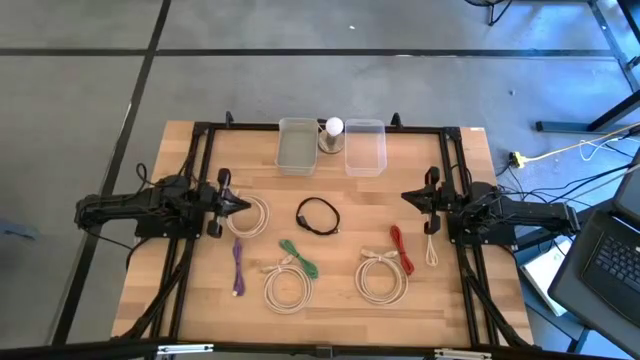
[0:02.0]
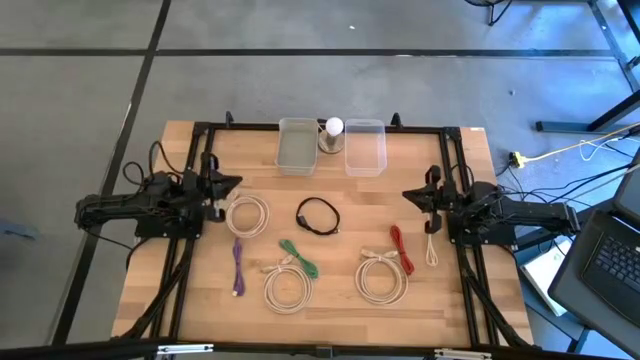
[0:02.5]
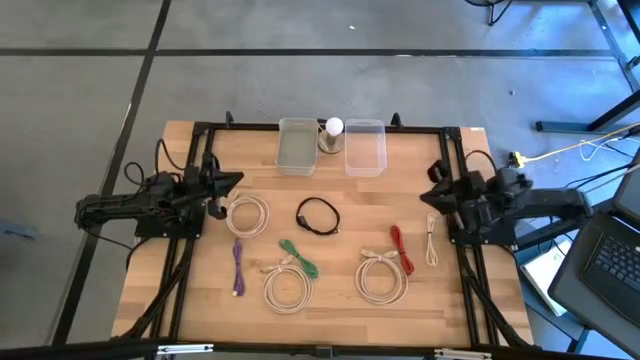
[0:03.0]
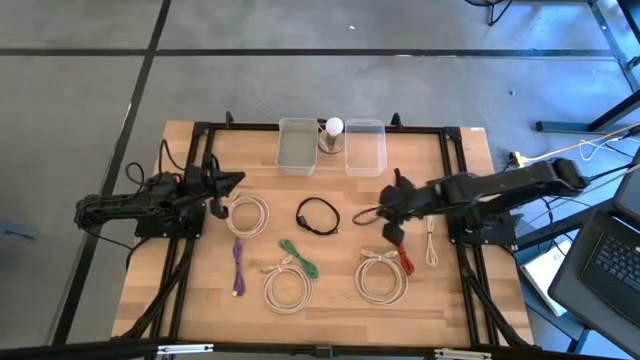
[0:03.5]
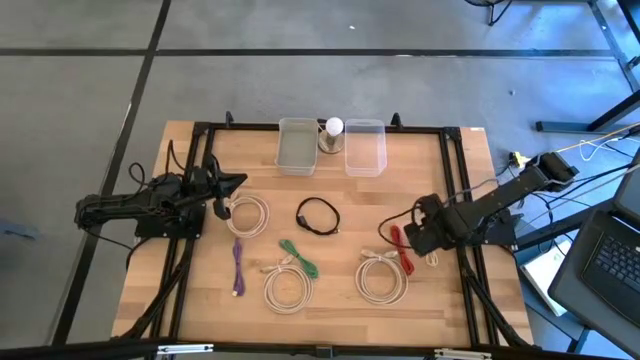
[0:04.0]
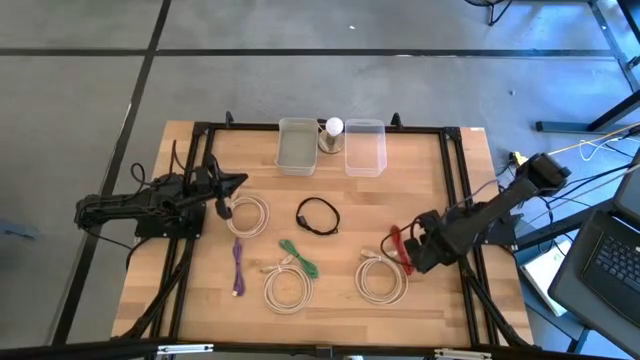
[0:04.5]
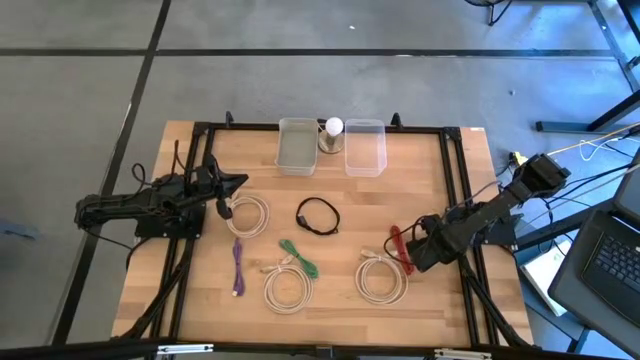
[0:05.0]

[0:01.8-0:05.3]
Put the light brown charger cable into the transparent bin

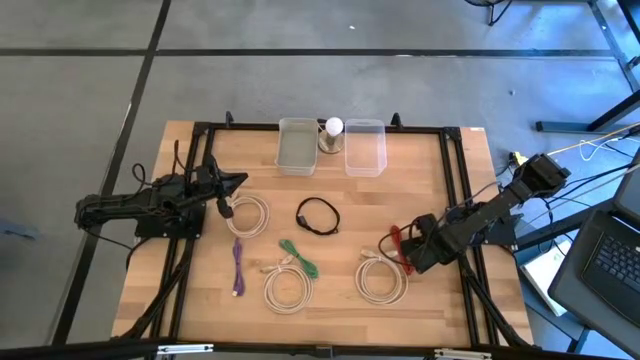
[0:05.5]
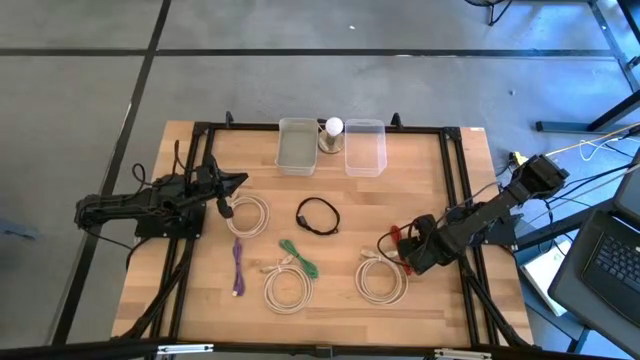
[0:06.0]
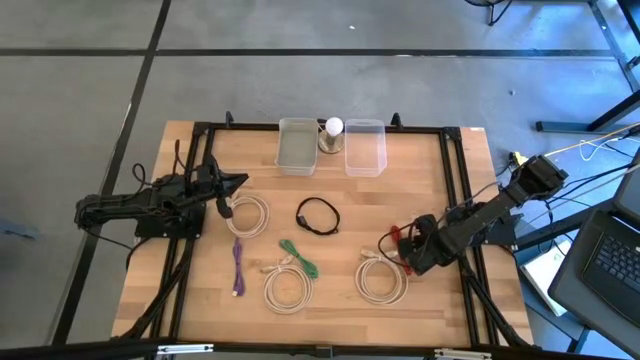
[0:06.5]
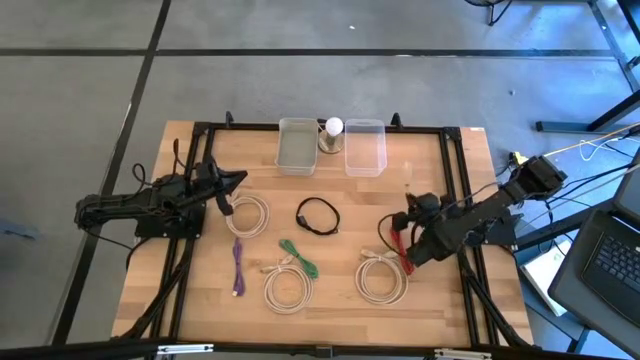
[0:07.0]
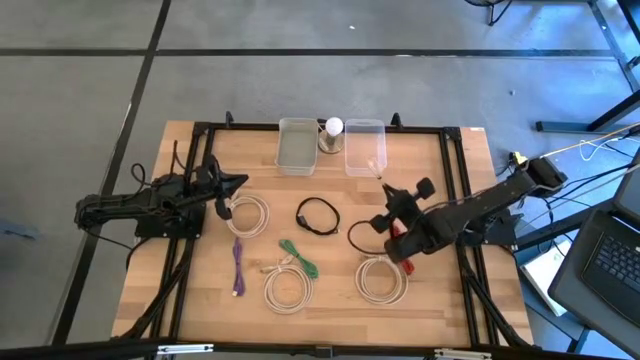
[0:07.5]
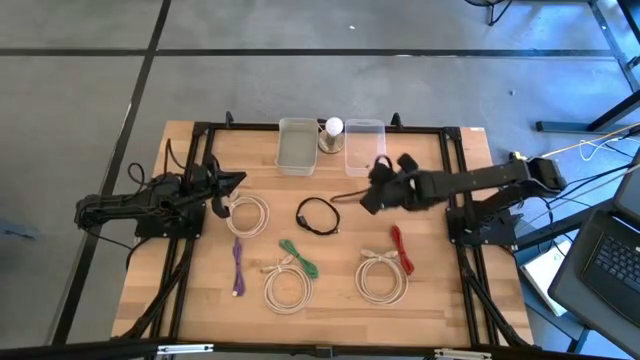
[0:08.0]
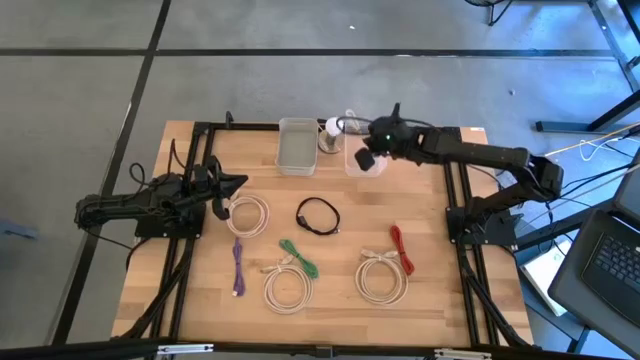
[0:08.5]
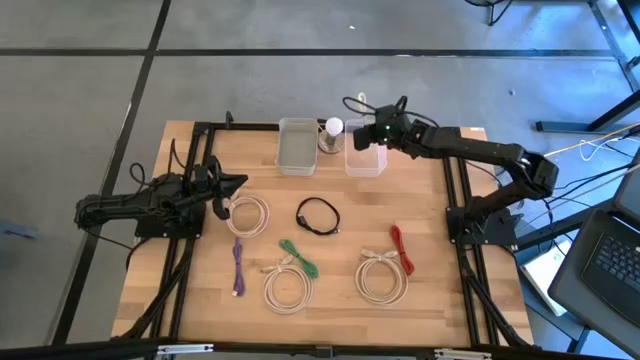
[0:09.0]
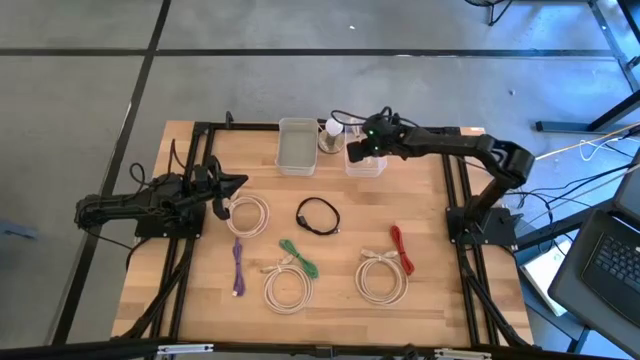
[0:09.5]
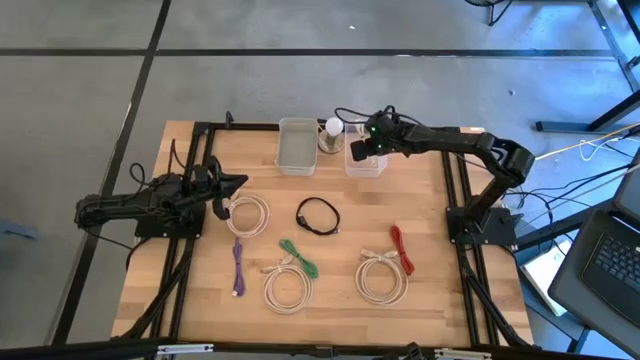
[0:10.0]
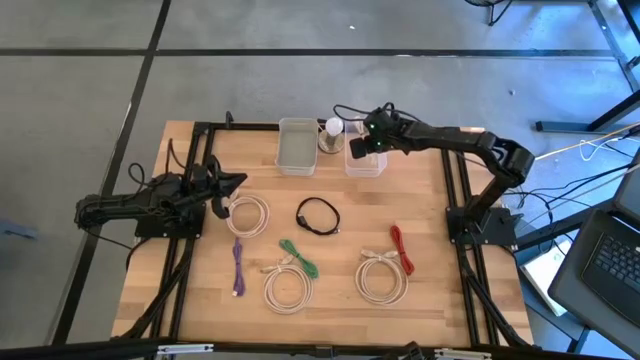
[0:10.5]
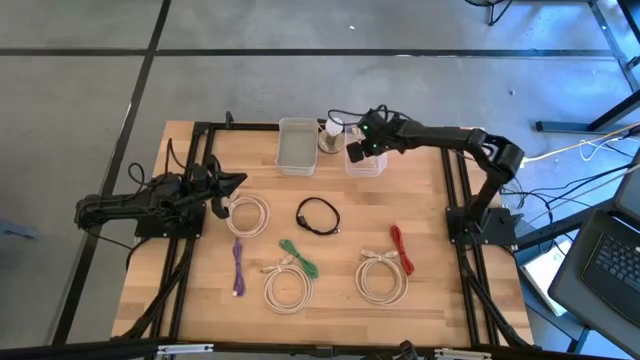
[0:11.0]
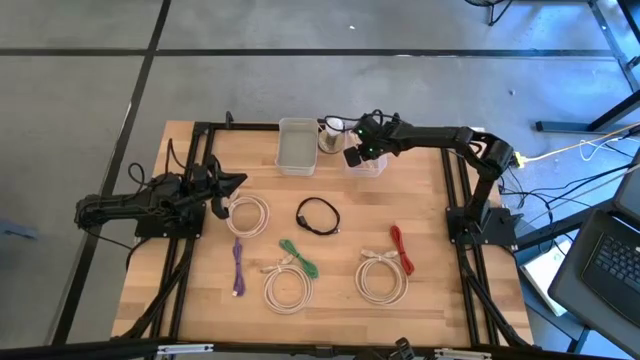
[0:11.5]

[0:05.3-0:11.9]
Put the light brown charger cable into the transparent bin

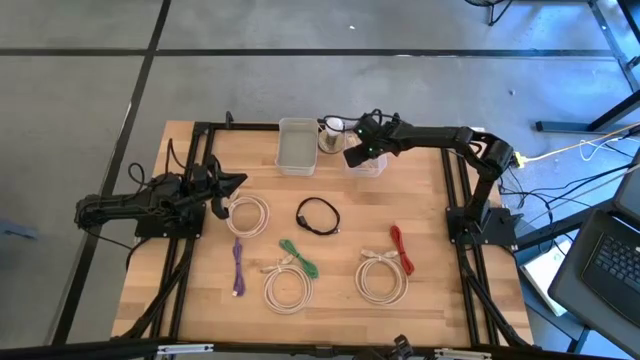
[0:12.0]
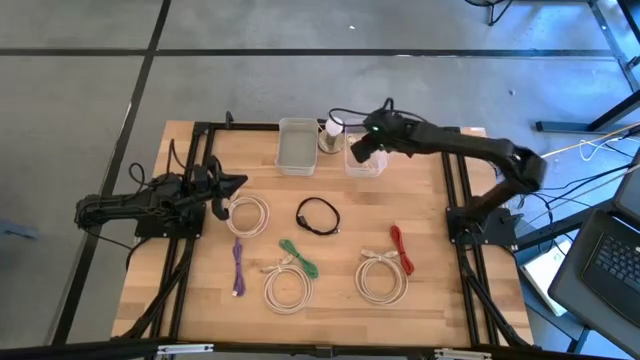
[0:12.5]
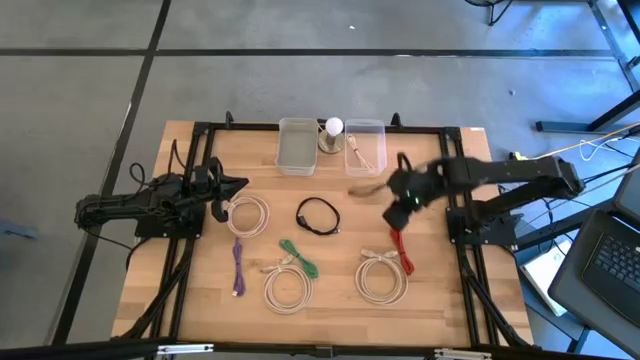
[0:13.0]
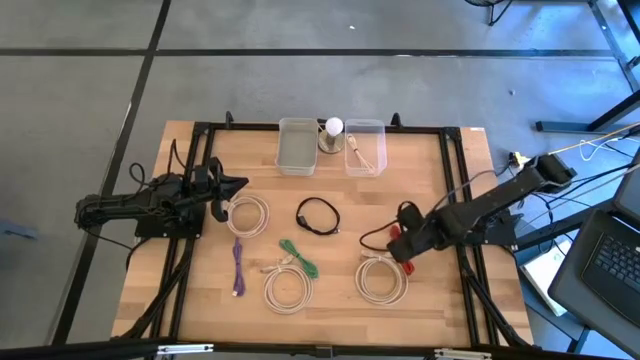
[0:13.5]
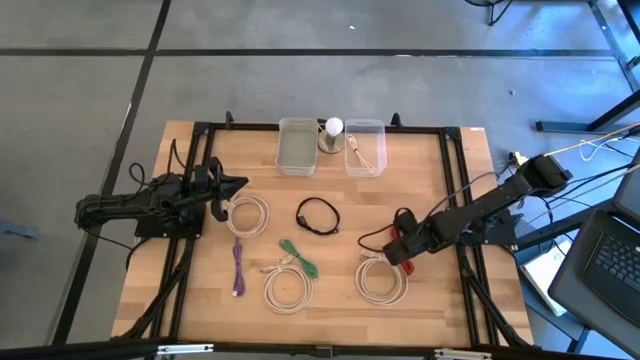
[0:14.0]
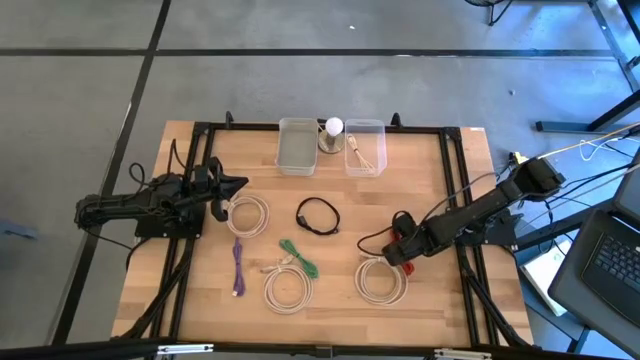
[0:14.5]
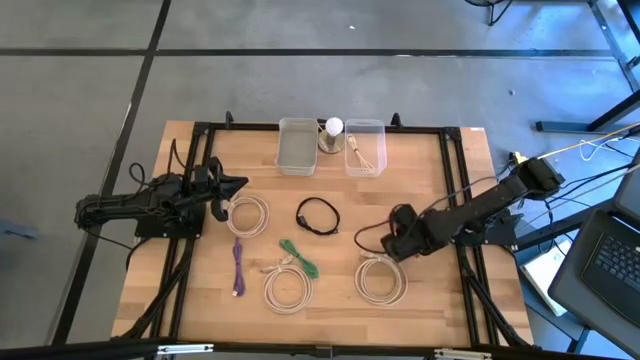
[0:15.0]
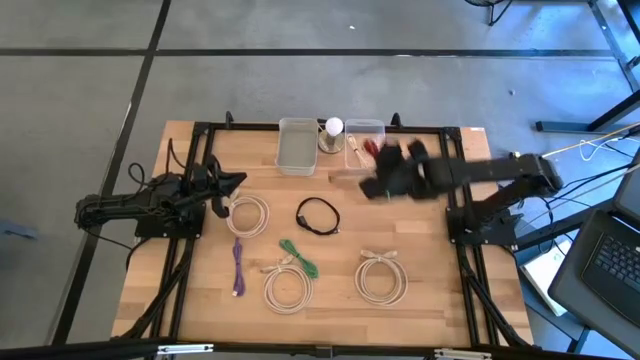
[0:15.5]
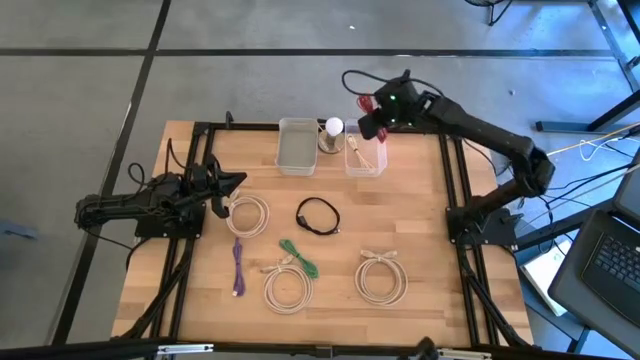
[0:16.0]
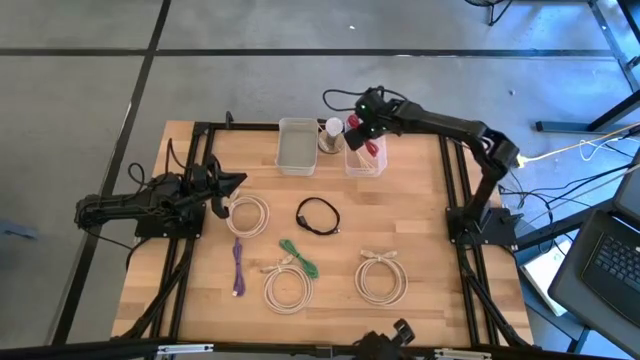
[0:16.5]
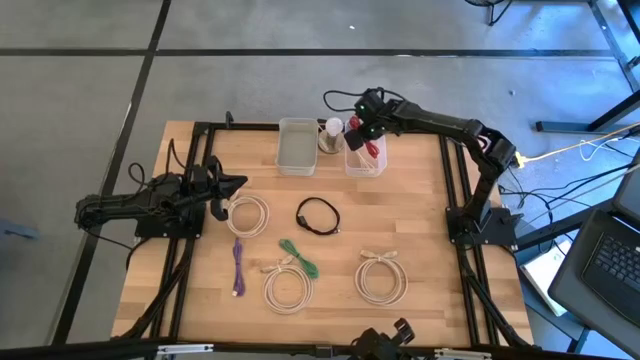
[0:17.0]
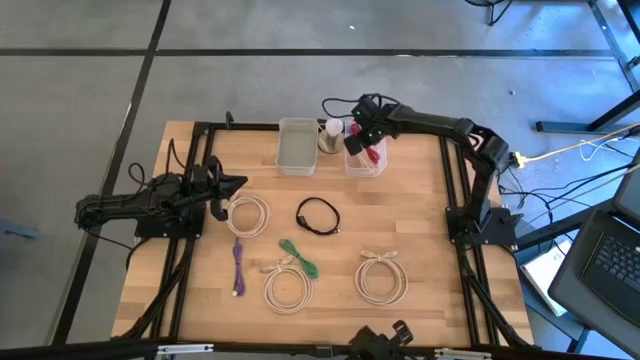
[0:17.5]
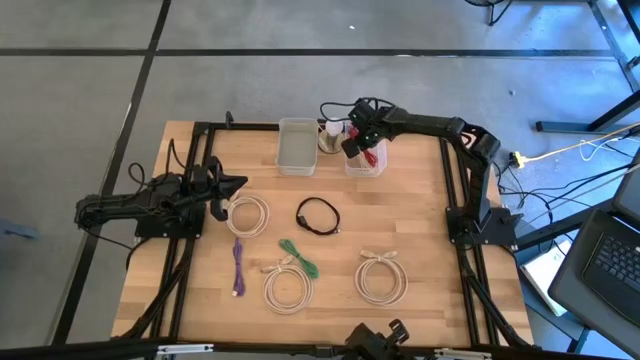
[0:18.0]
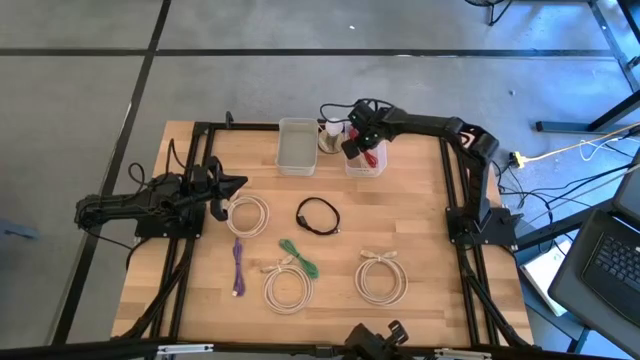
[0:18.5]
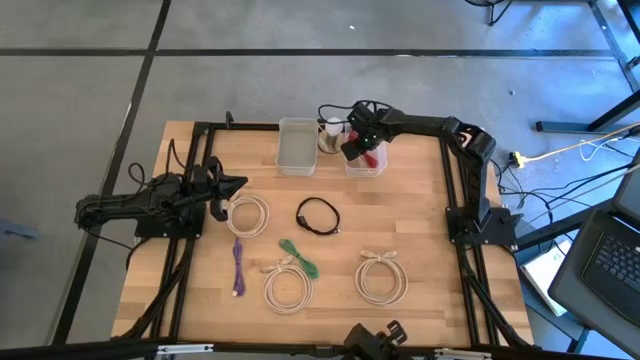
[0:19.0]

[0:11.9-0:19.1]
Put the red charger cable into the transparent bin

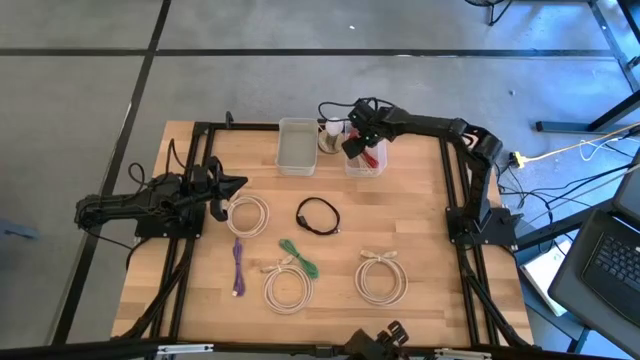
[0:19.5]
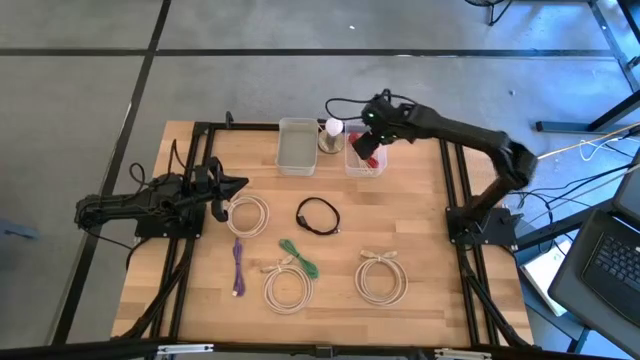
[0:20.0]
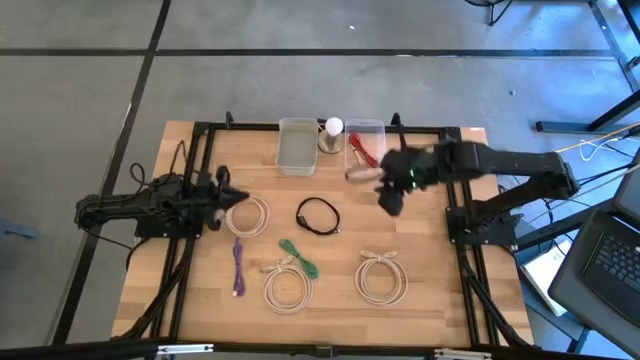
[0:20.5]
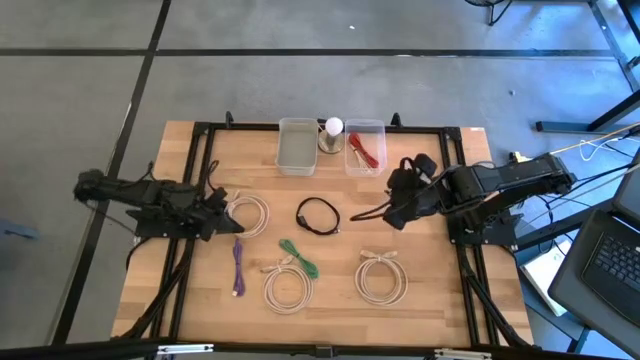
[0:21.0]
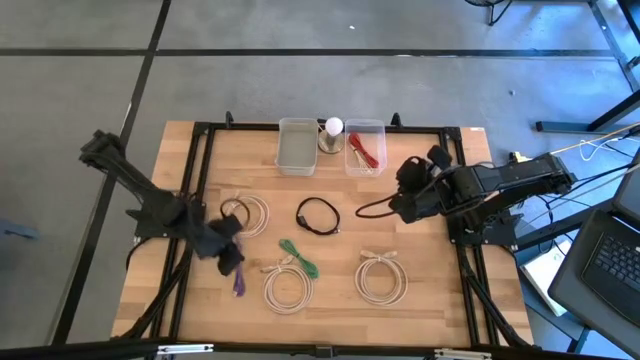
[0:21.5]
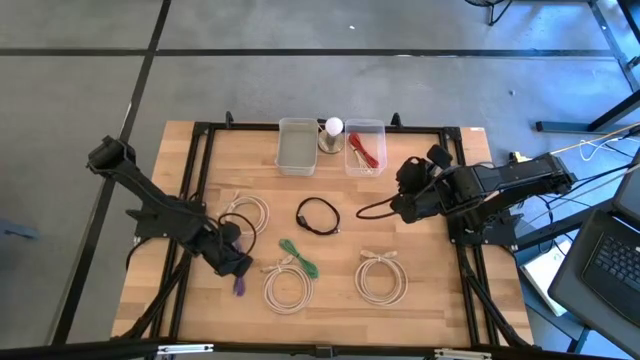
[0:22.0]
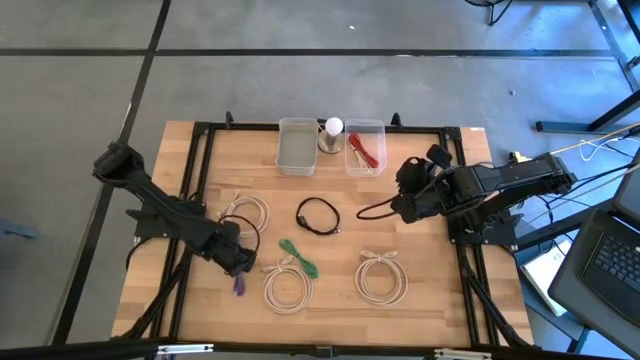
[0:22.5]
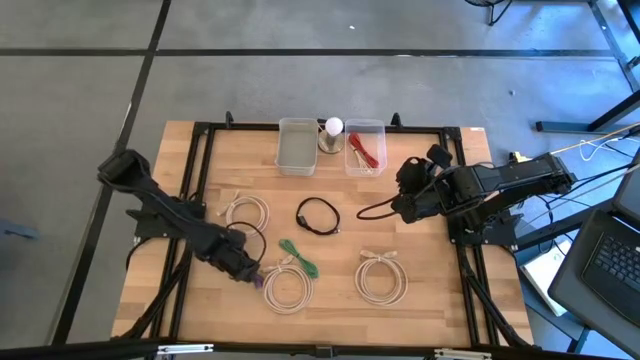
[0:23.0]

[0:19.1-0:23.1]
Put the violet charger cable into the transparent bin
